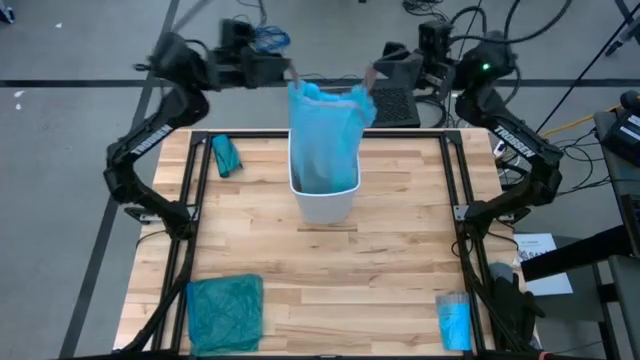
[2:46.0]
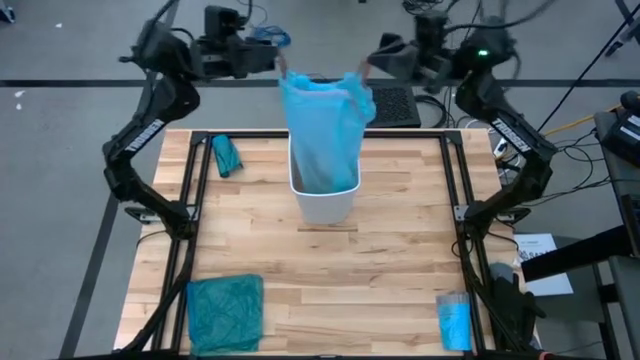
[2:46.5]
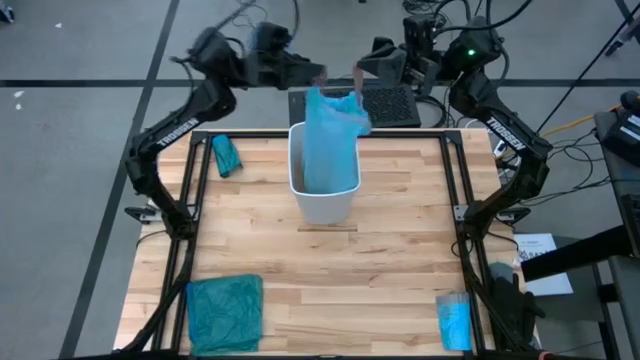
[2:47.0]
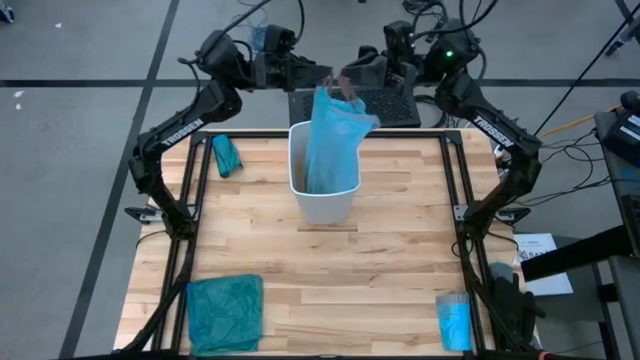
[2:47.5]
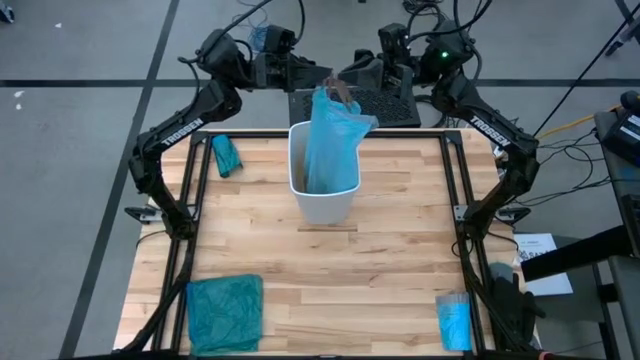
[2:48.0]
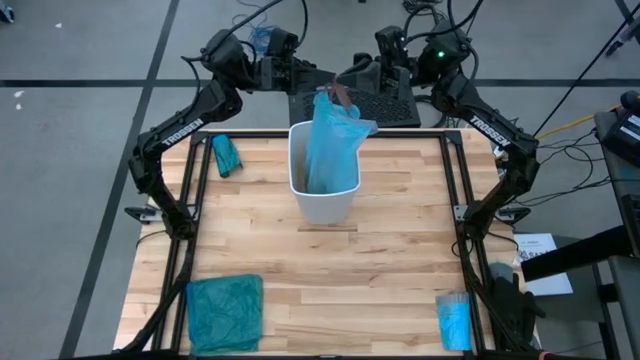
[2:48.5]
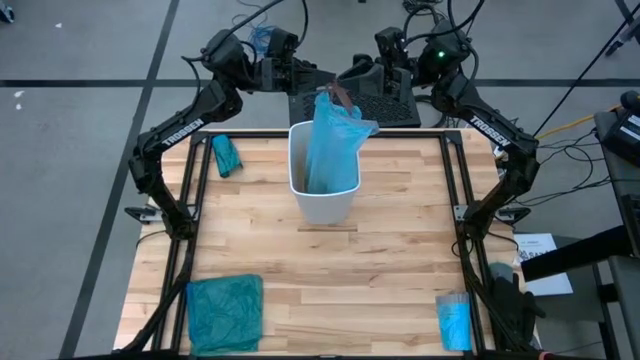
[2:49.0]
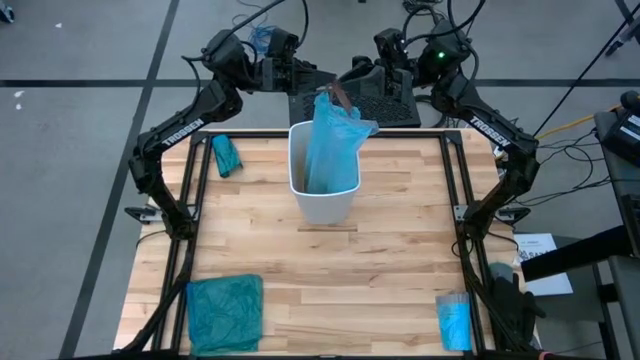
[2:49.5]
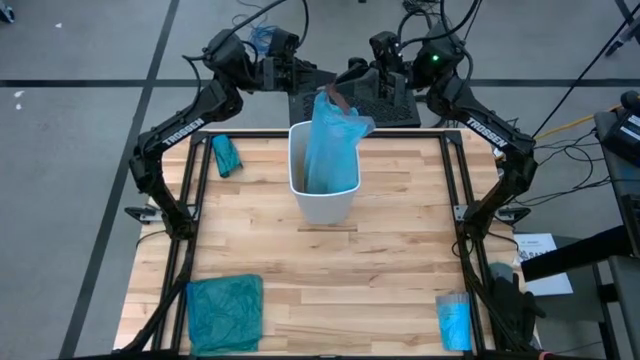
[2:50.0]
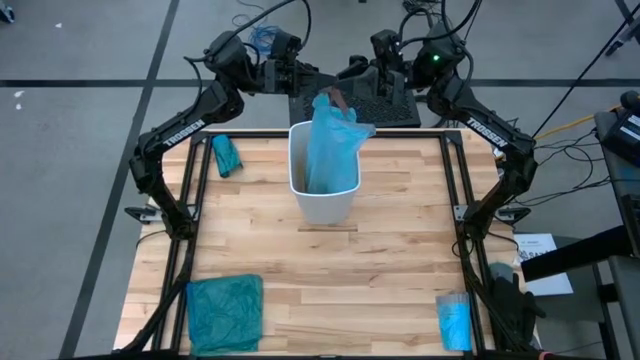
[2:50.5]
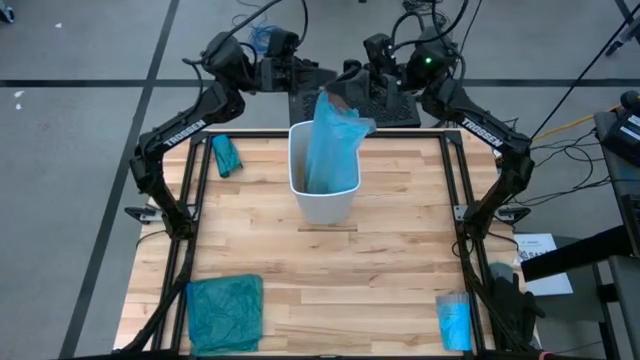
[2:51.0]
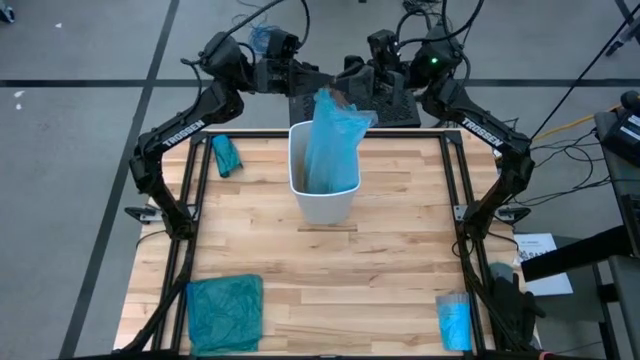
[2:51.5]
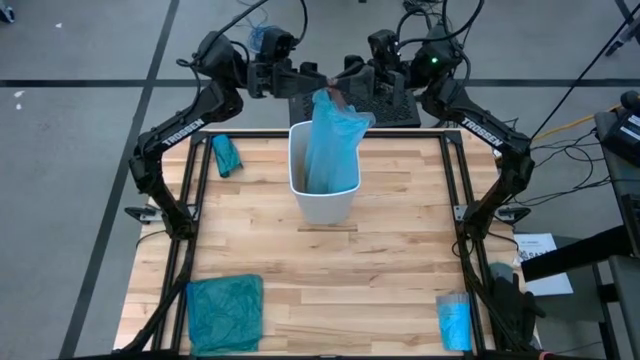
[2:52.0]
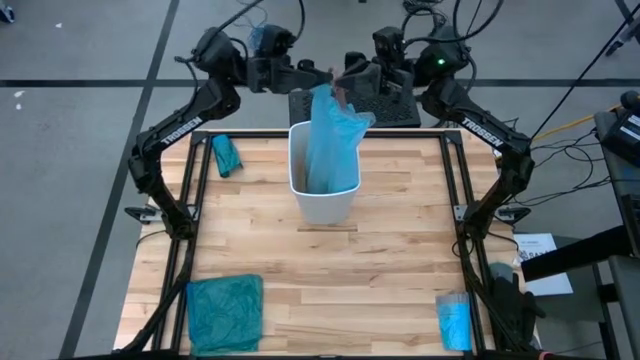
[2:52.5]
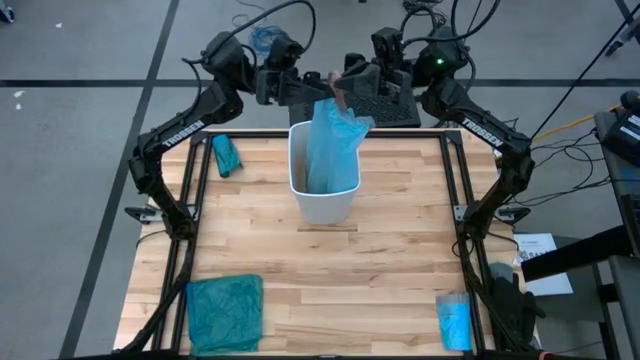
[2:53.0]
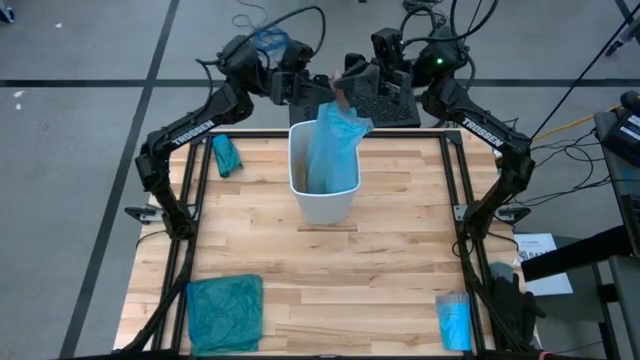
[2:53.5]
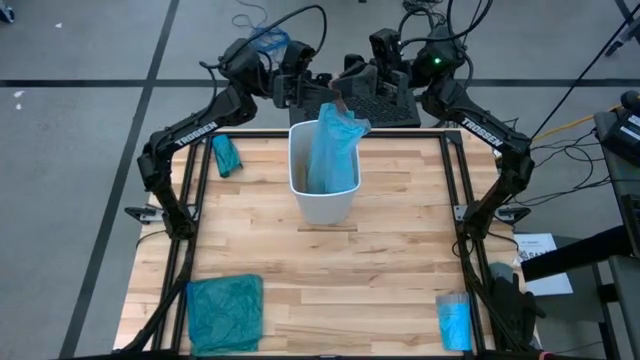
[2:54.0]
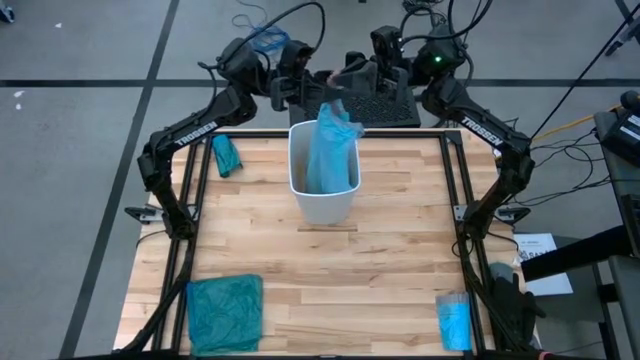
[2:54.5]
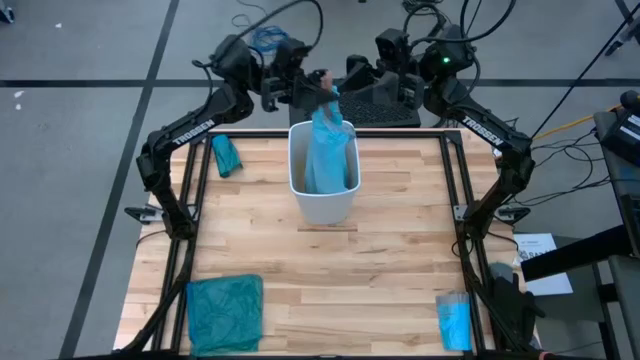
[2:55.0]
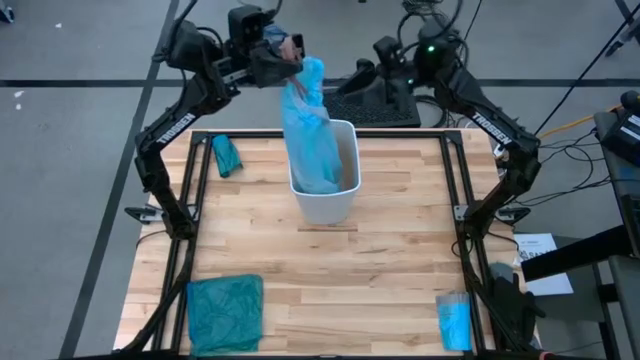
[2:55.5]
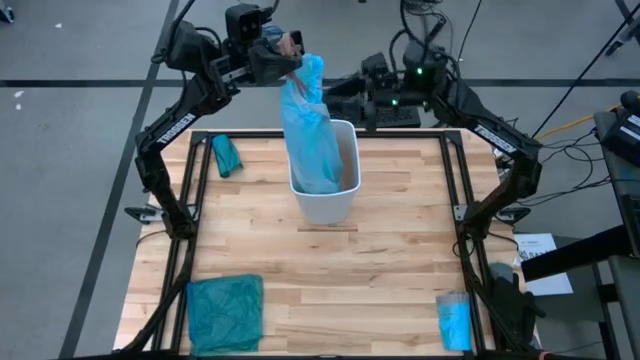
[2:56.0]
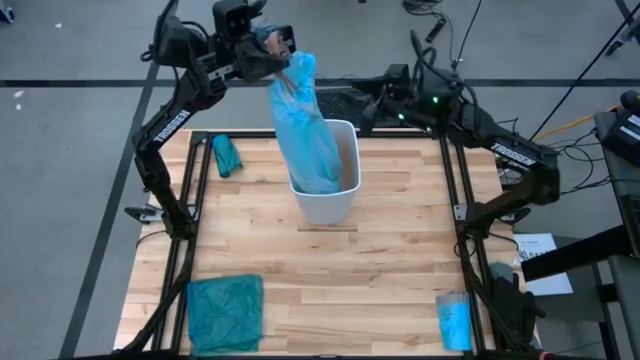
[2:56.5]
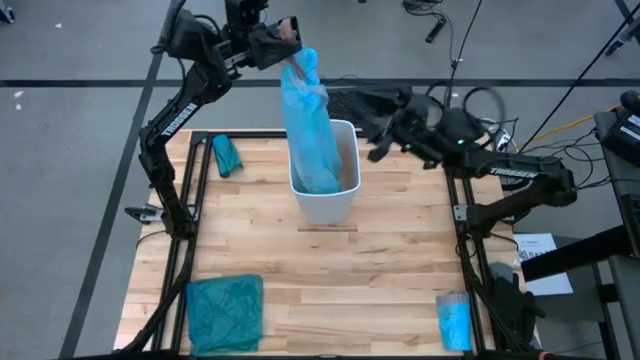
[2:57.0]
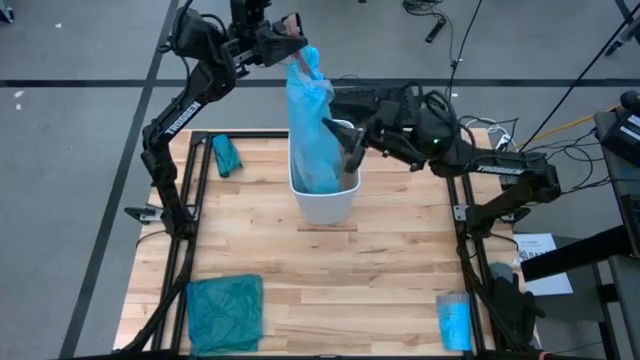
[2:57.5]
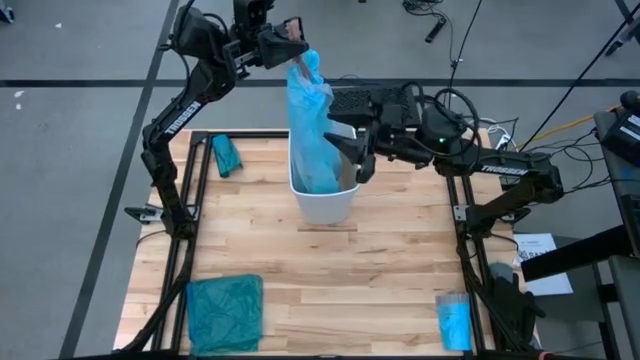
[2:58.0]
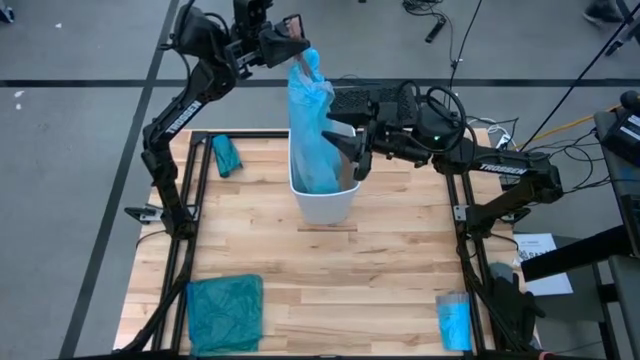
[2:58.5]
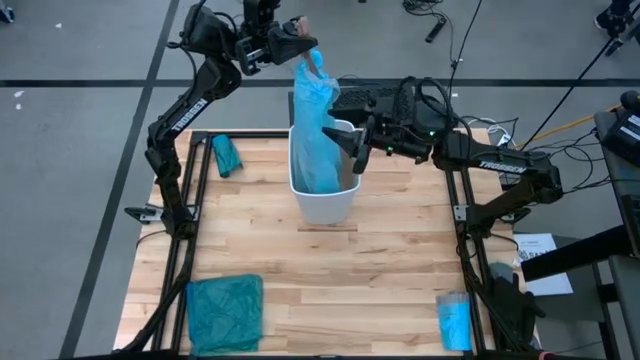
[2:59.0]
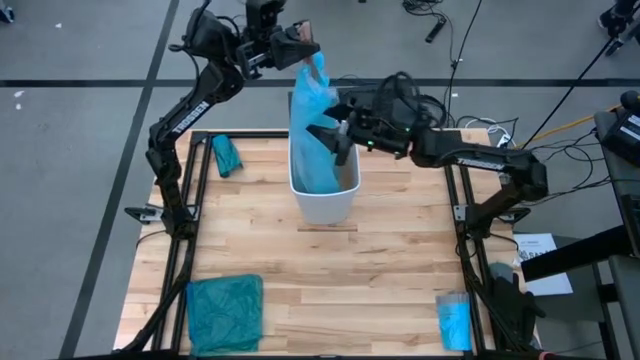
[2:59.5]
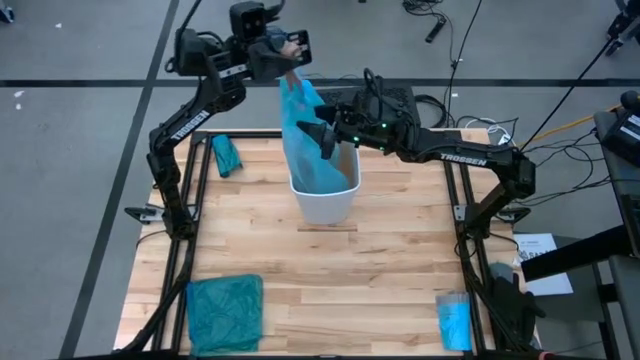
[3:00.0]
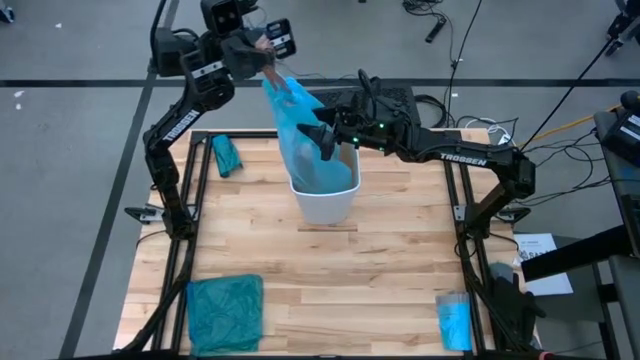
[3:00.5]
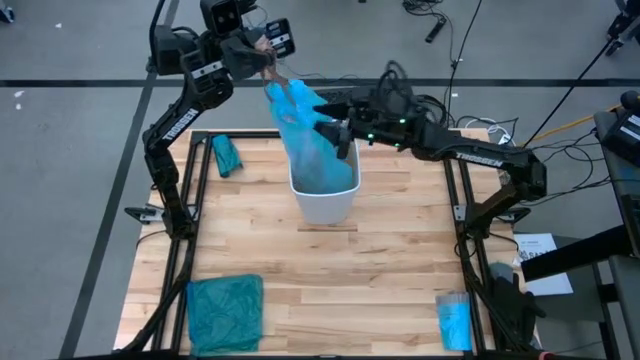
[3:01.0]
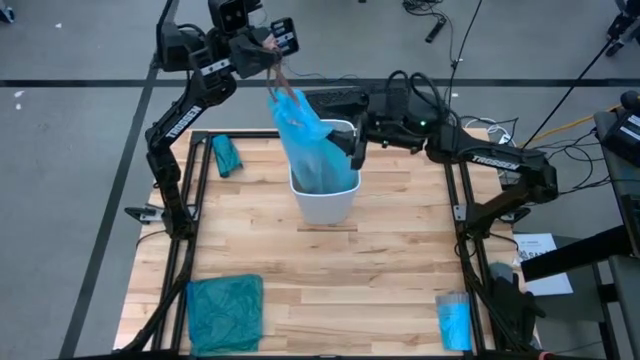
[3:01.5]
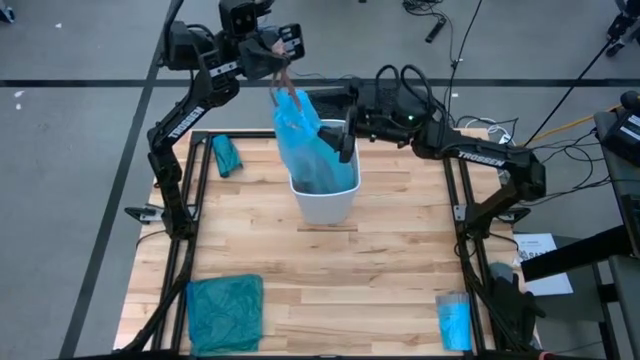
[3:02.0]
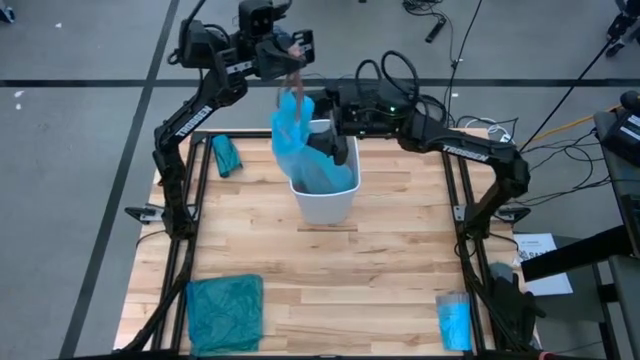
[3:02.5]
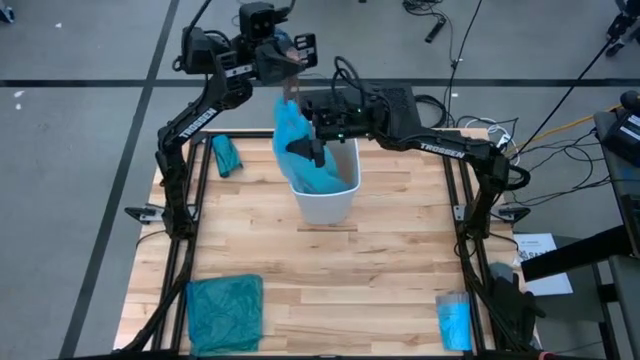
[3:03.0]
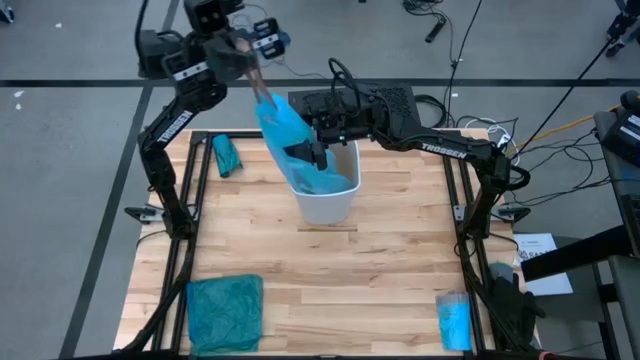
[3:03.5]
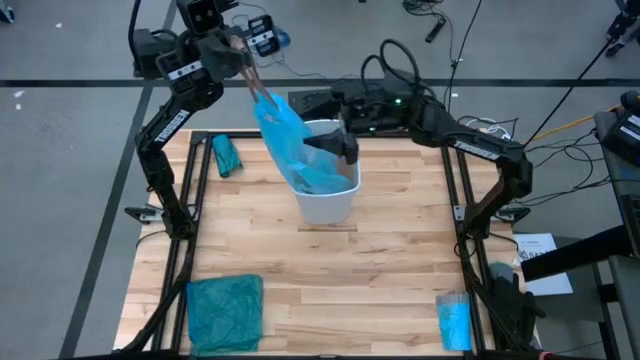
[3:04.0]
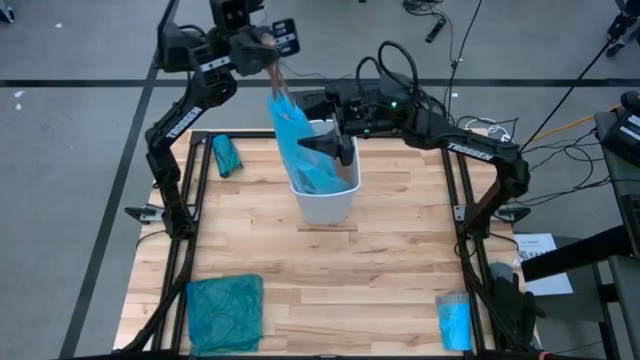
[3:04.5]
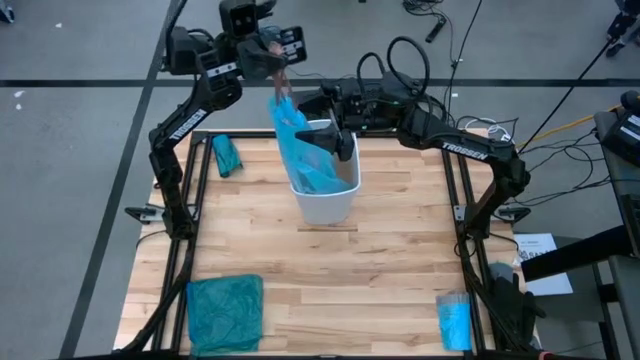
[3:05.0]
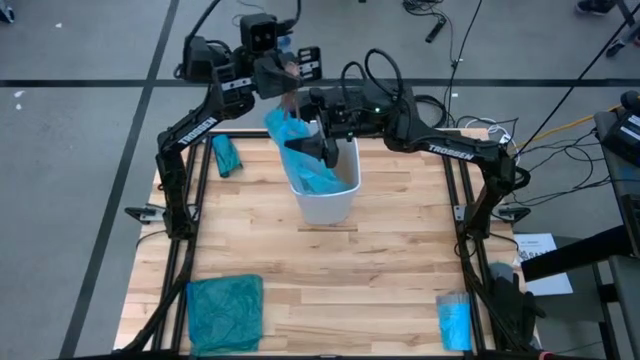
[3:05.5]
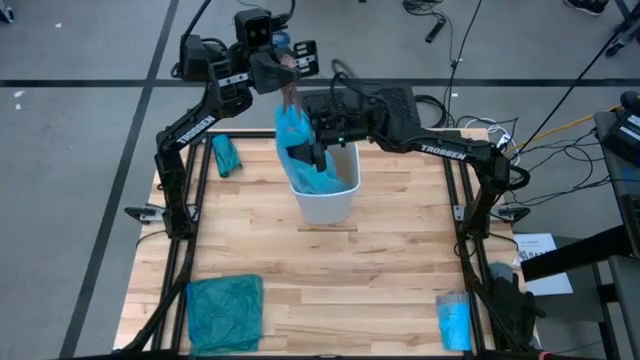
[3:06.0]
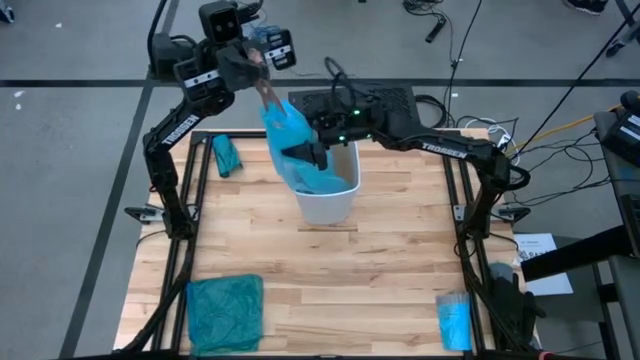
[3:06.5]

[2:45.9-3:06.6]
Task: place trash/remove bag and relplace
Remove the blue trash bag from the white trash bin
